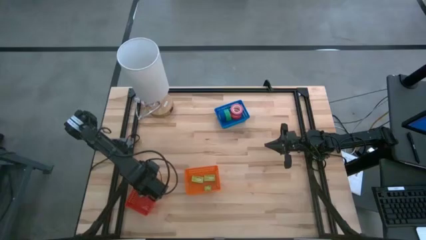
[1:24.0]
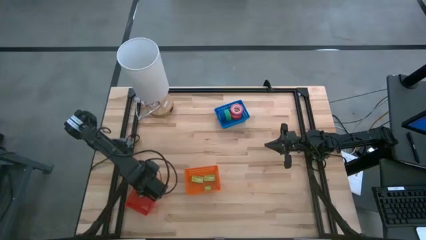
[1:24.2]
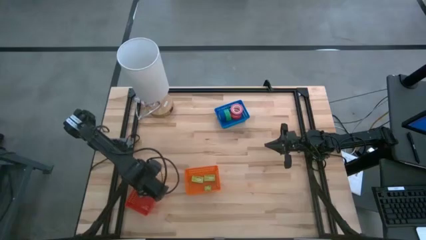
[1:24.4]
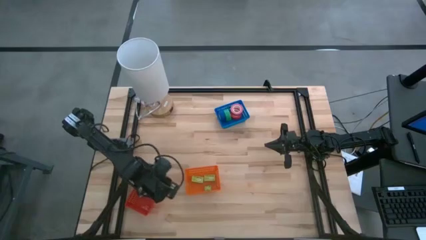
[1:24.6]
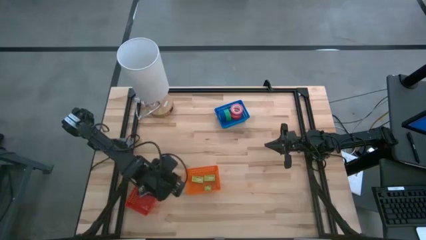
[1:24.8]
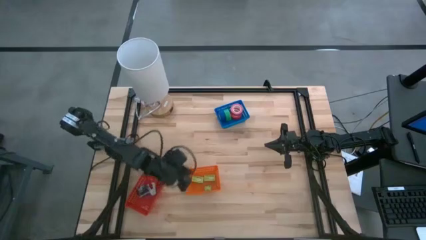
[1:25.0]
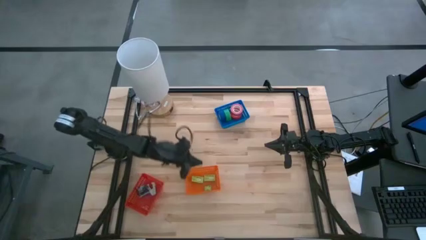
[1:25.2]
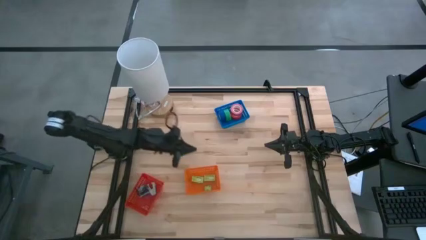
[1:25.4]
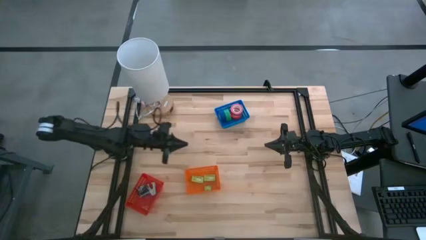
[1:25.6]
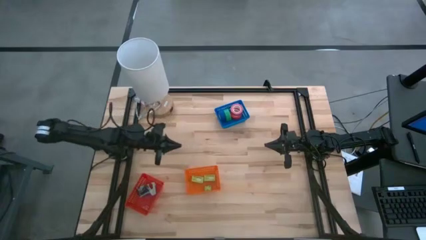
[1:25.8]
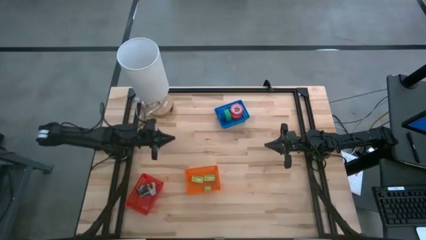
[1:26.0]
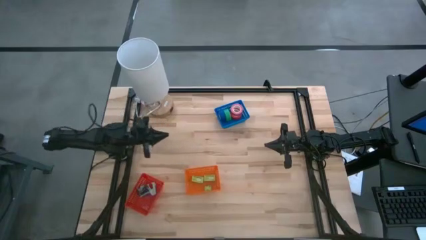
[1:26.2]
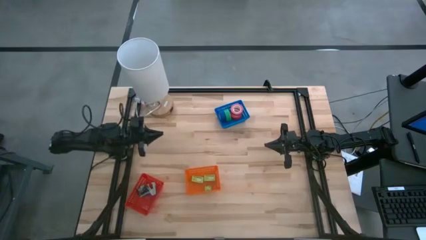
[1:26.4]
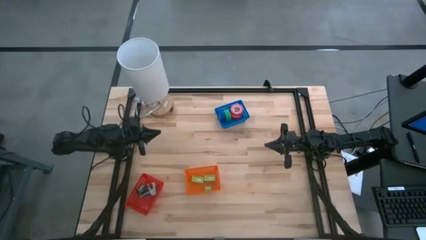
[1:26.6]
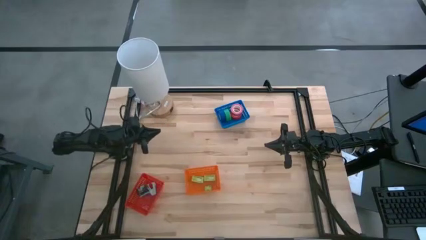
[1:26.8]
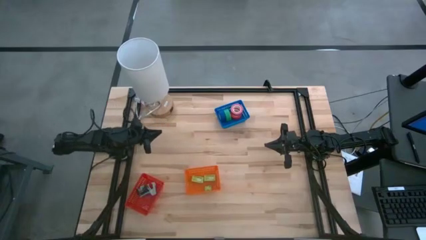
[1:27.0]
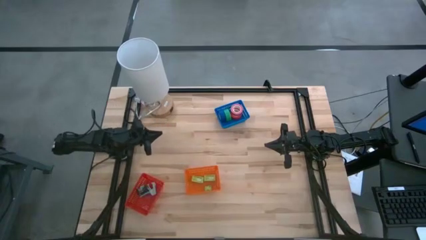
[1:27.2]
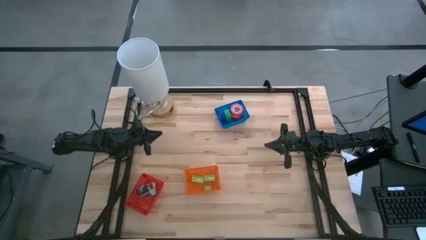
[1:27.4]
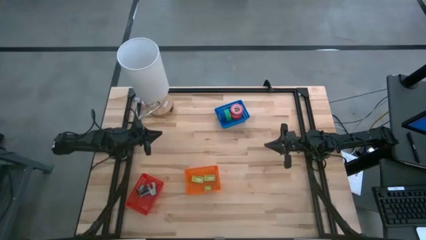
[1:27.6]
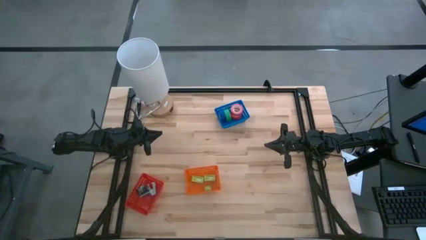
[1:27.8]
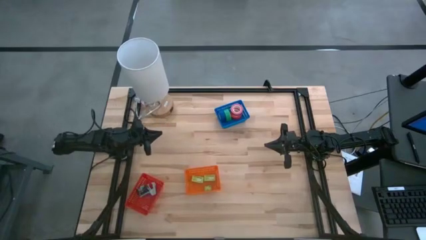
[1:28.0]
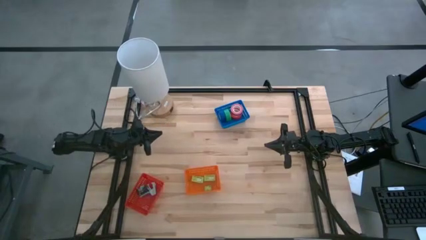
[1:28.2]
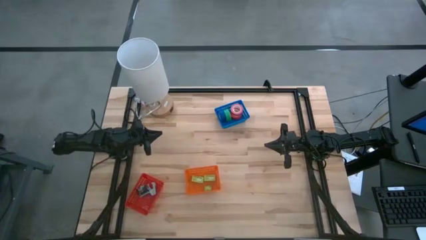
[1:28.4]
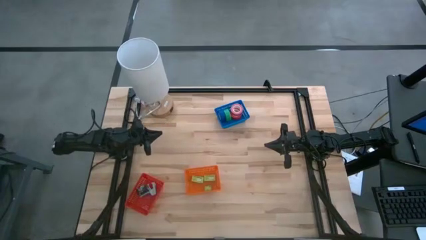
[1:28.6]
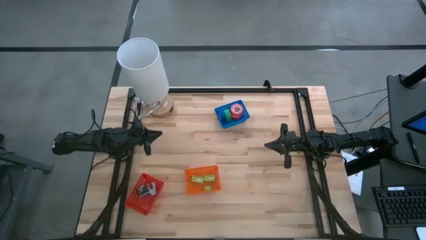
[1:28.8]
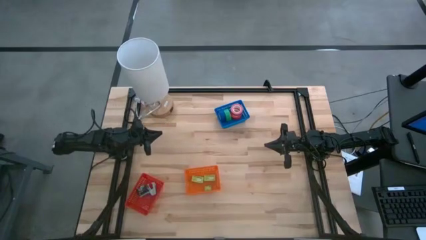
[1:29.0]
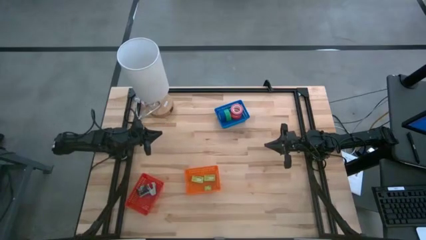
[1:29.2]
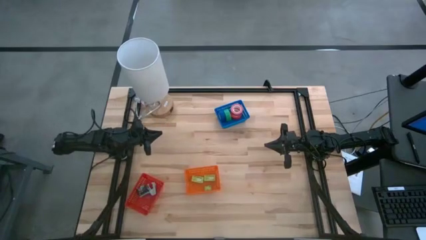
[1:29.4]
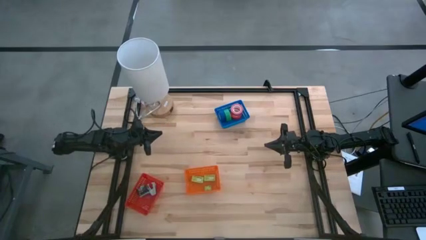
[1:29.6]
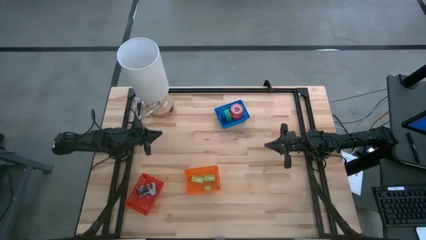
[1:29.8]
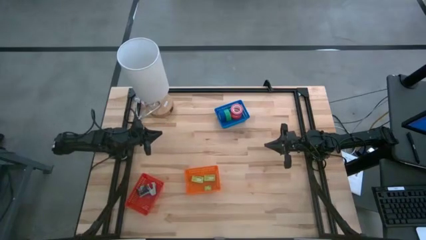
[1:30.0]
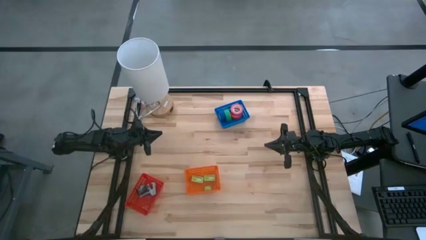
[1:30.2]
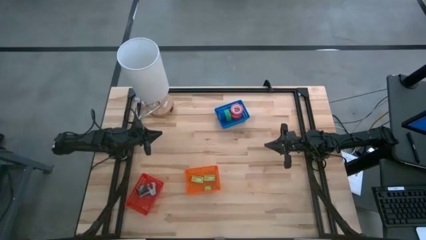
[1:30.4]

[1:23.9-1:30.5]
Task: Pick and place Stapler, Stapler remover, tape
Return to Home Position

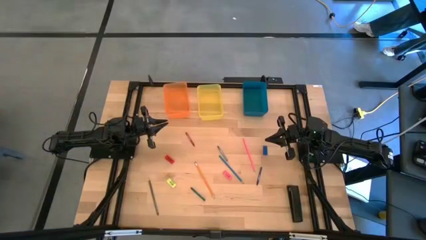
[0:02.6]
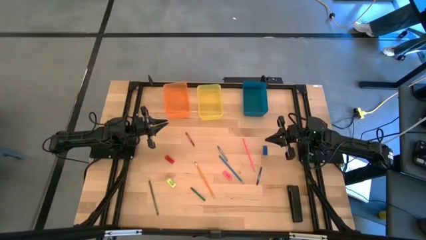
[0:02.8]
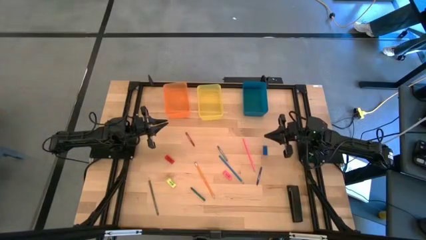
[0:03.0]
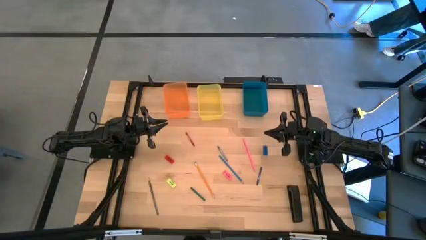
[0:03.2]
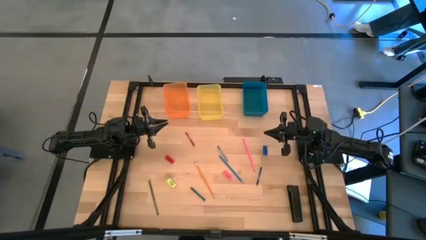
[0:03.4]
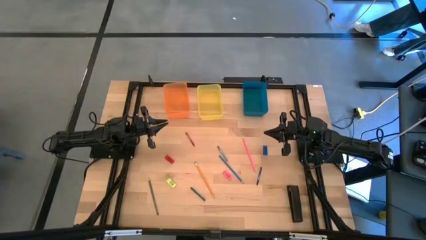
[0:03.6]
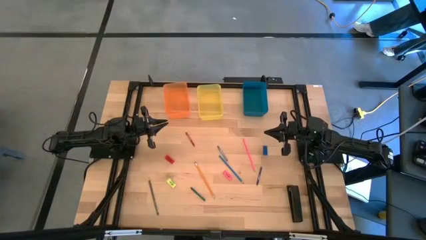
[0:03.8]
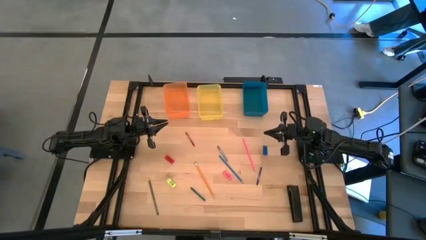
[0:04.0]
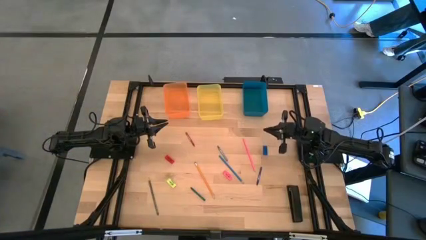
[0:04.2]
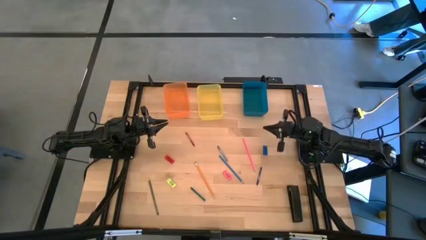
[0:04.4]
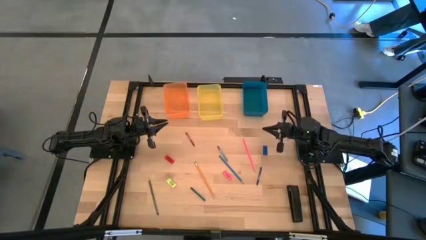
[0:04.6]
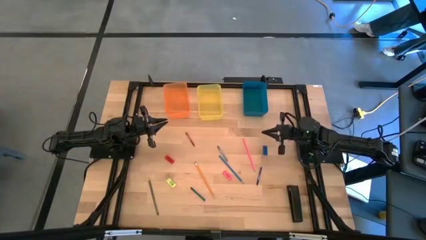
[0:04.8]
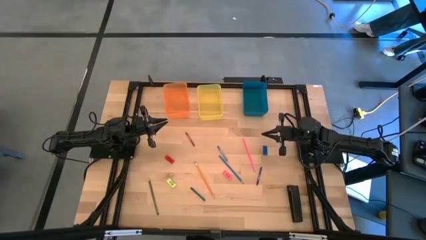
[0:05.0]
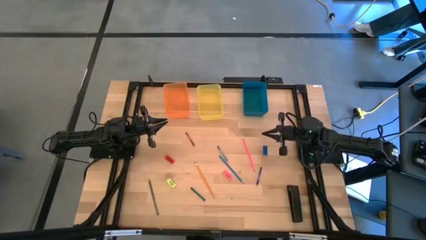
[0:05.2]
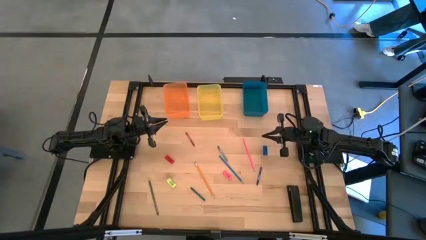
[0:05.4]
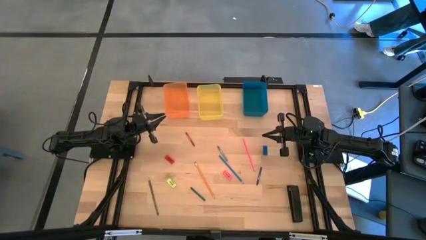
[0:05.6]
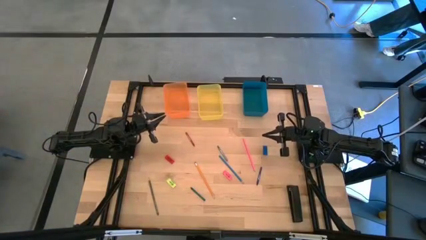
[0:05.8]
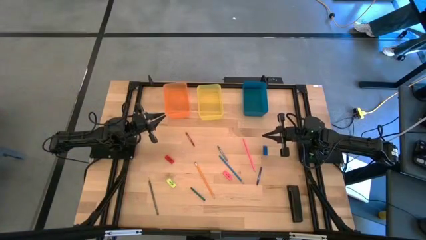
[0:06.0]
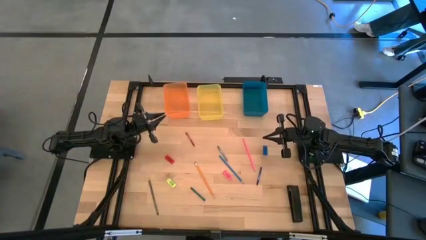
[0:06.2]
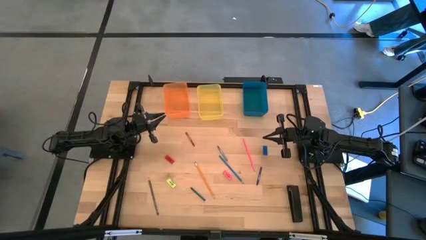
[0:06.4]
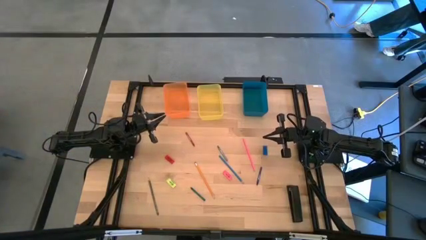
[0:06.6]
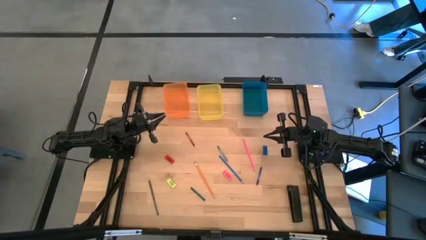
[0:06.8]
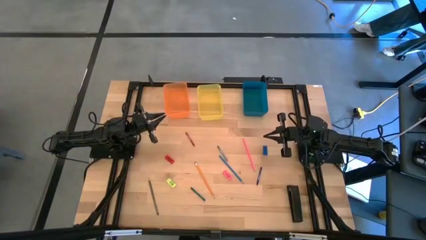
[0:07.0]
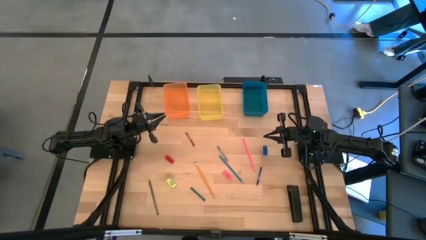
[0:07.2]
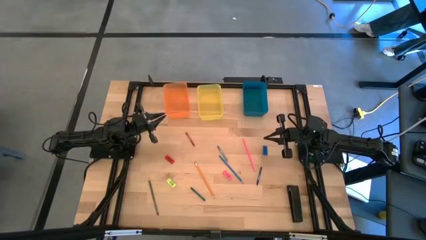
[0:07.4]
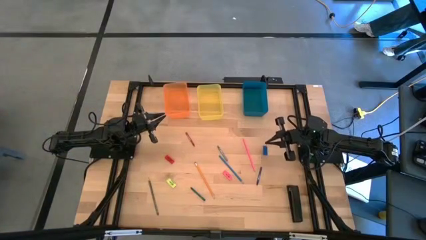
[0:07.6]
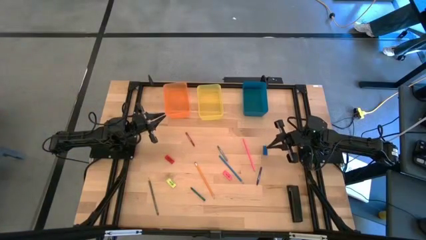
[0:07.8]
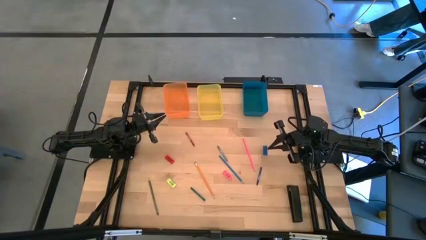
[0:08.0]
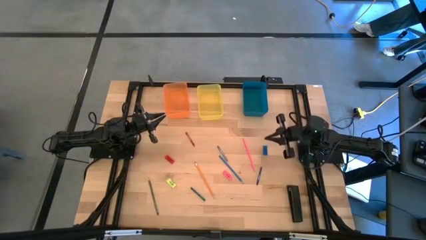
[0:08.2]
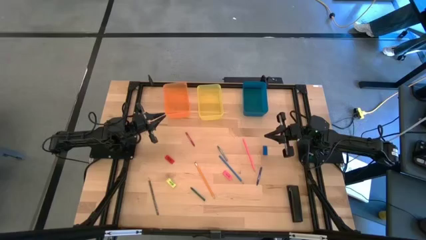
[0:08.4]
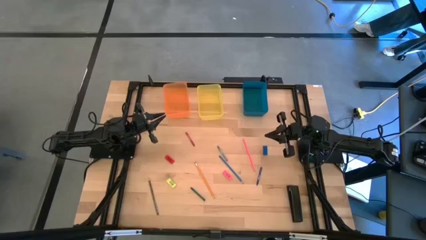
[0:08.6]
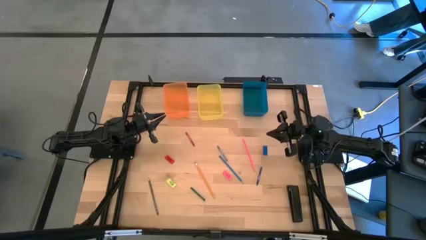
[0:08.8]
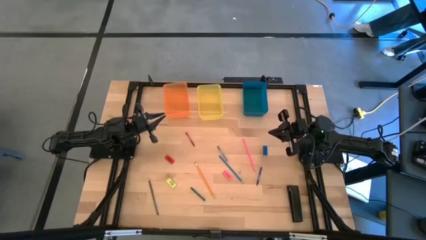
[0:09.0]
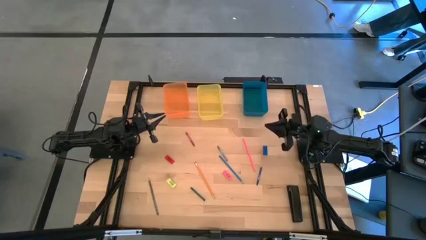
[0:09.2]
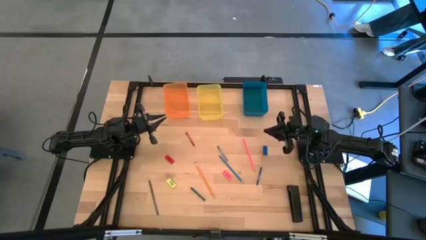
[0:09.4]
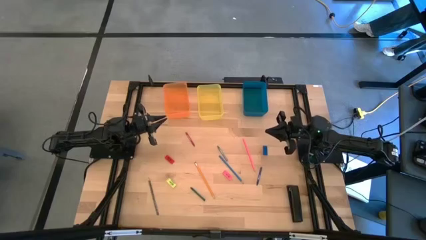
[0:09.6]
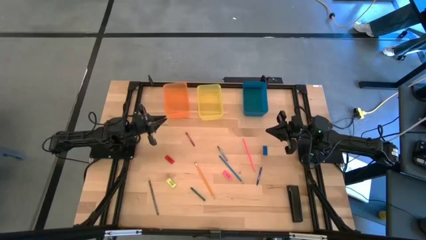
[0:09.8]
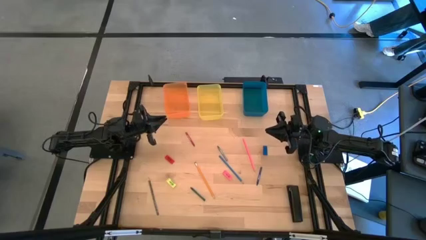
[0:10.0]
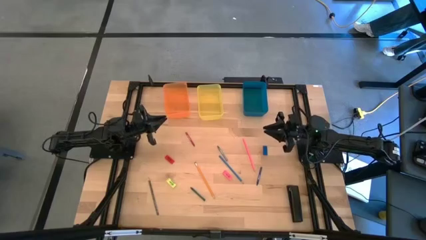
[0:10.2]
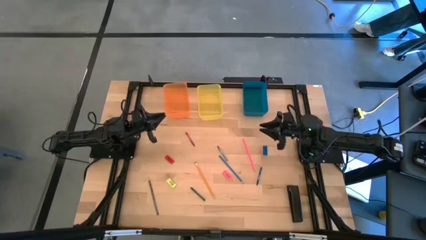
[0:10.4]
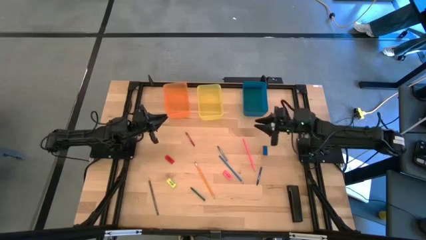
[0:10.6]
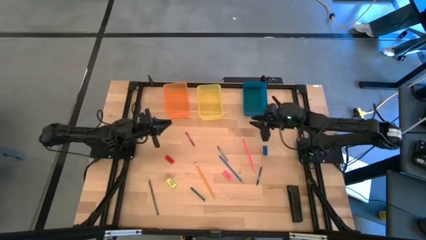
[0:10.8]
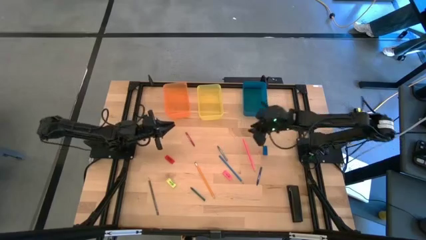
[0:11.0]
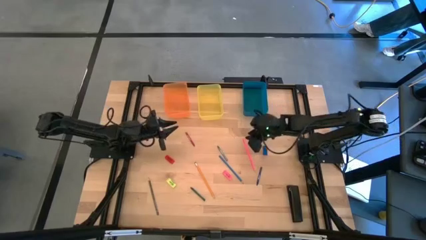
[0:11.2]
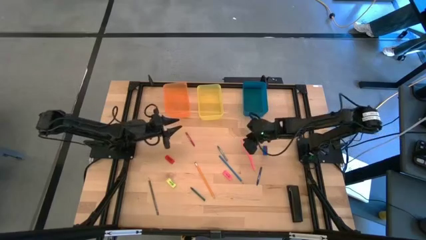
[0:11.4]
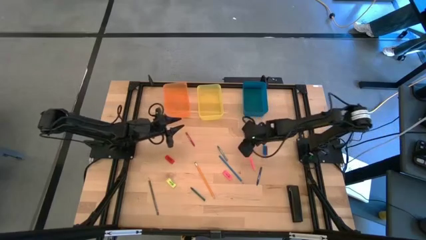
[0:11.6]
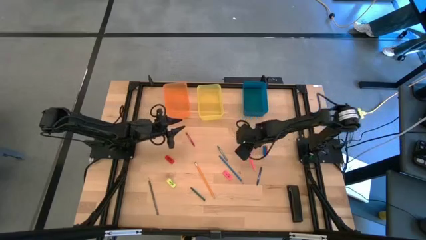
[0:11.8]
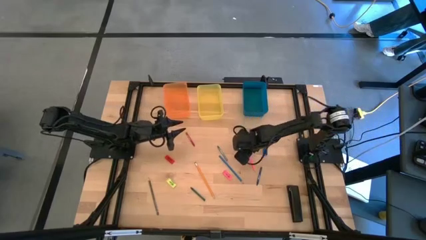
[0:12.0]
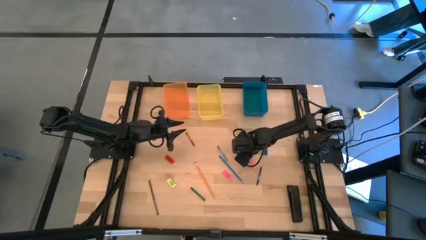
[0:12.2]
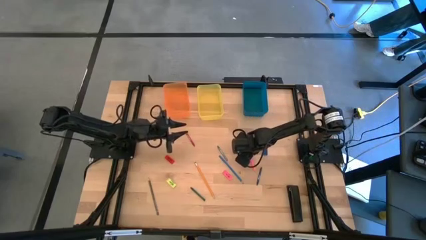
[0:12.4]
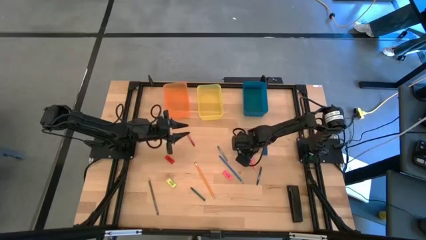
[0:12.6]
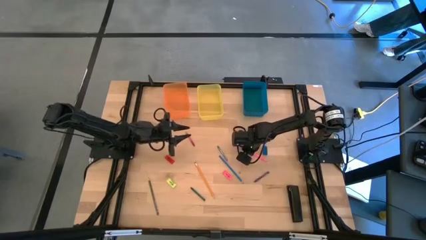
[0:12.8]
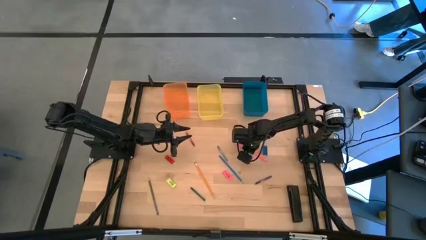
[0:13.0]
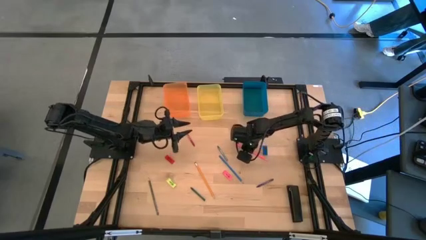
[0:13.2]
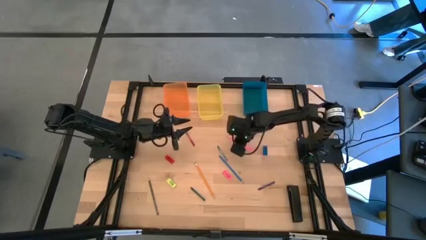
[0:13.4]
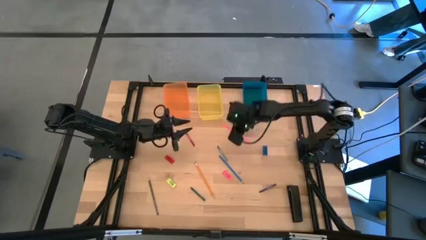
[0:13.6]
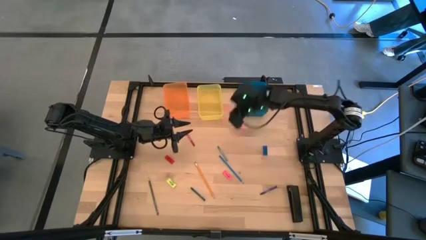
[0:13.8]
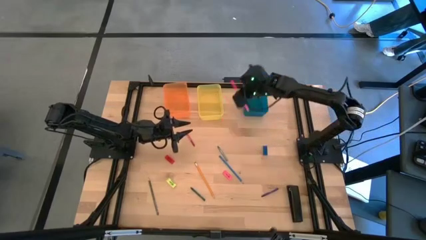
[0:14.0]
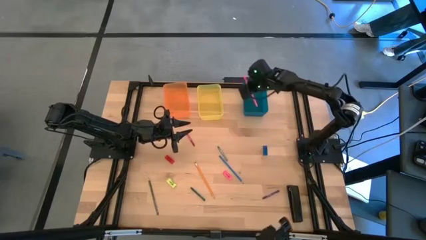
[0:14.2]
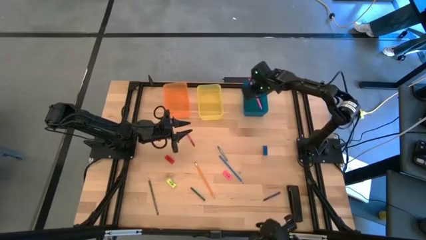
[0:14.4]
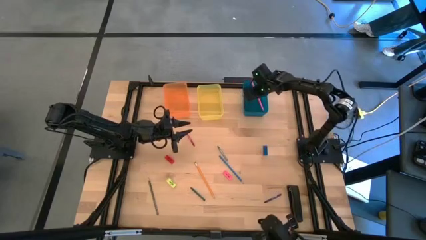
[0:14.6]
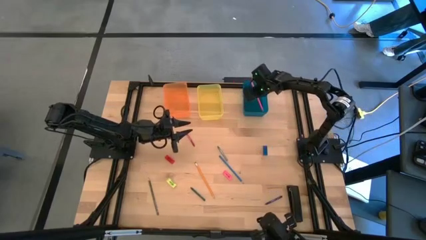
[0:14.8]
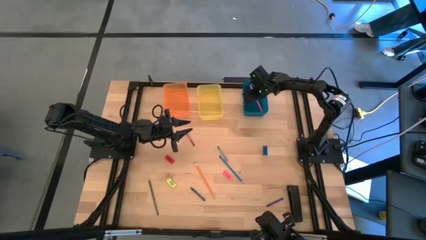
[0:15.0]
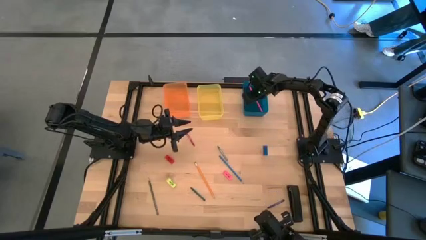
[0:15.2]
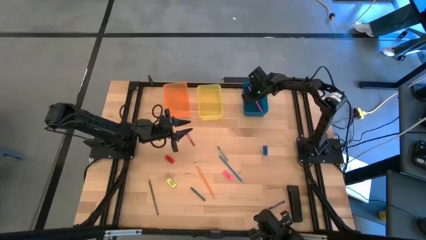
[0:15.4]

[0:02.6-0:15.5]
Task: Sort crayons/erasers/pens/pencils in bins
Put the pink pencil into the blue bin
